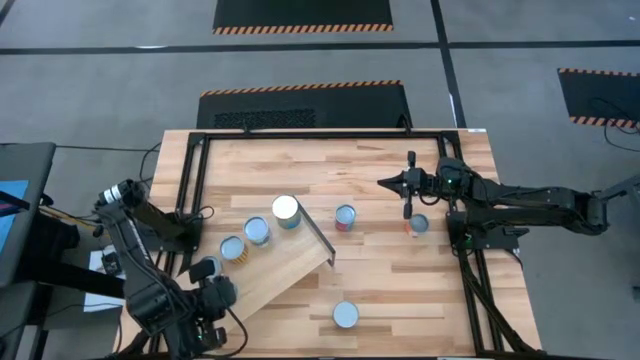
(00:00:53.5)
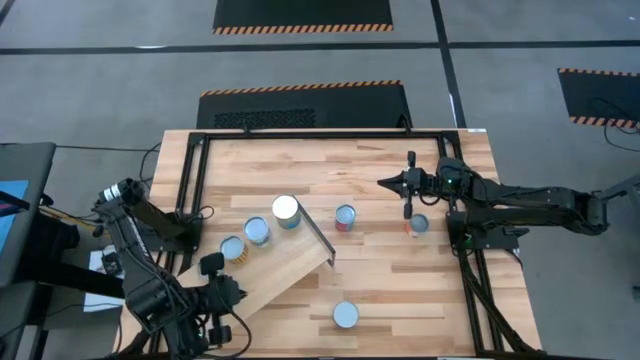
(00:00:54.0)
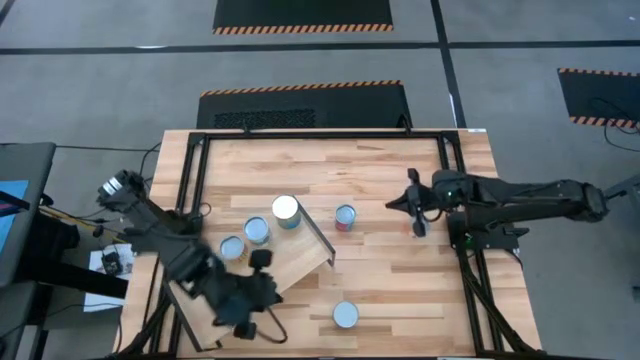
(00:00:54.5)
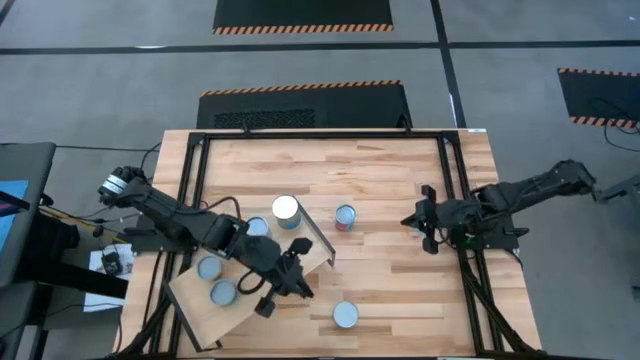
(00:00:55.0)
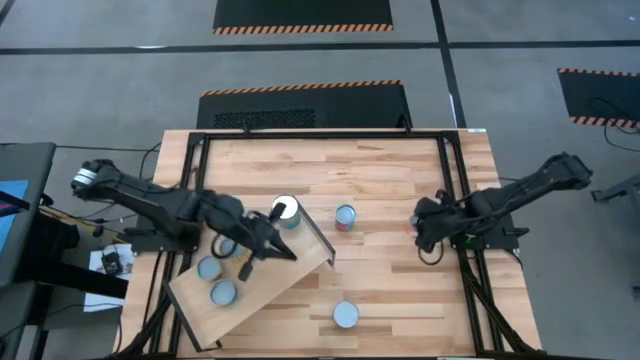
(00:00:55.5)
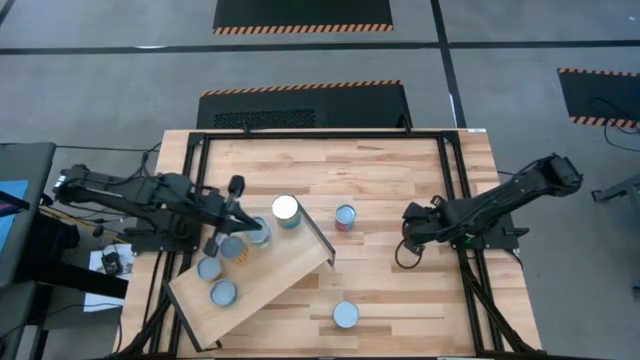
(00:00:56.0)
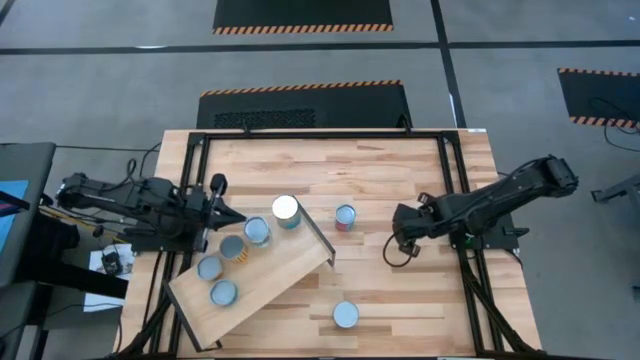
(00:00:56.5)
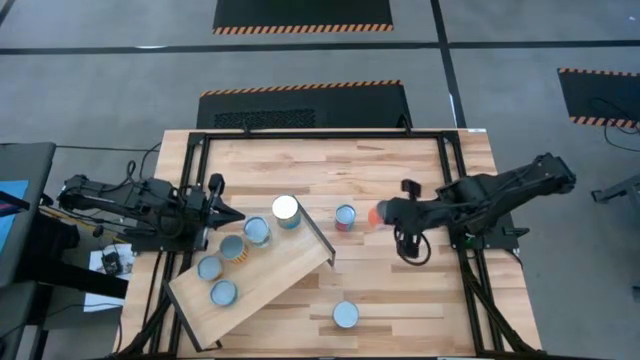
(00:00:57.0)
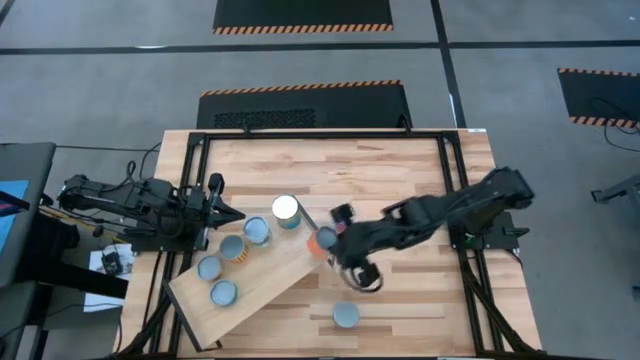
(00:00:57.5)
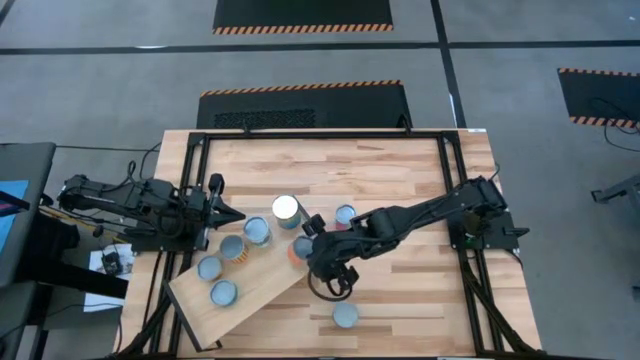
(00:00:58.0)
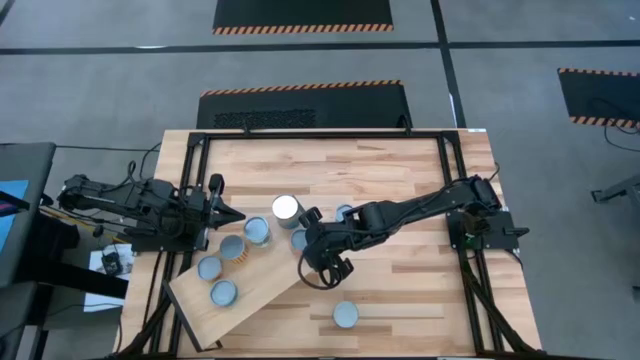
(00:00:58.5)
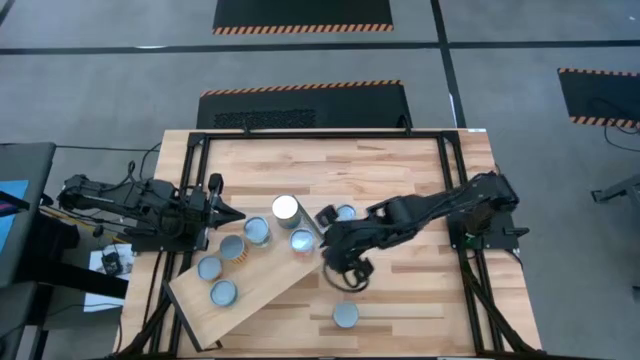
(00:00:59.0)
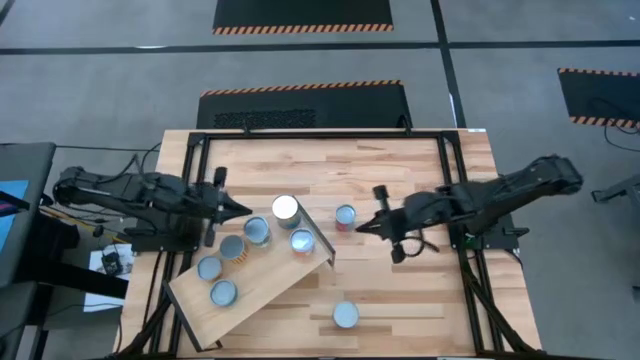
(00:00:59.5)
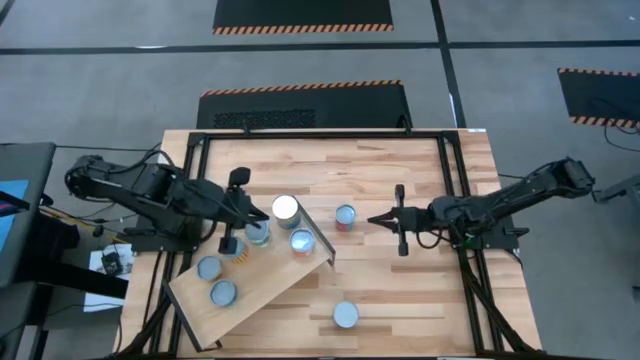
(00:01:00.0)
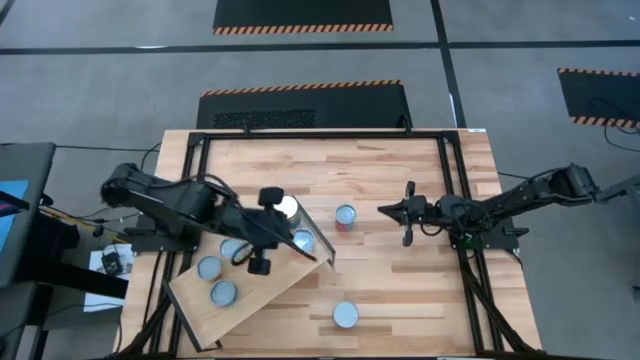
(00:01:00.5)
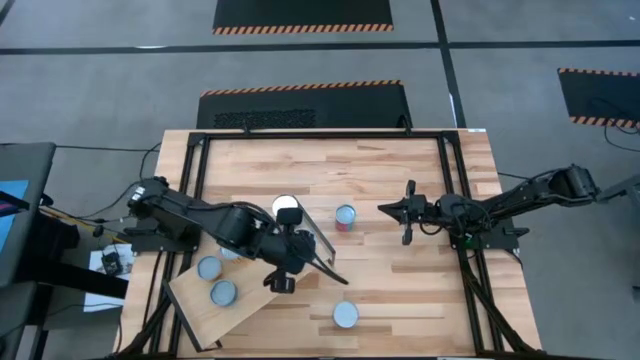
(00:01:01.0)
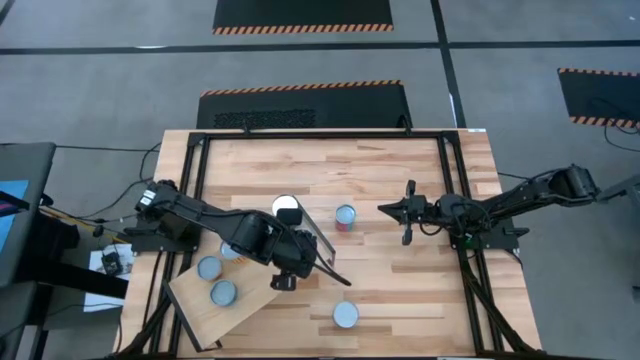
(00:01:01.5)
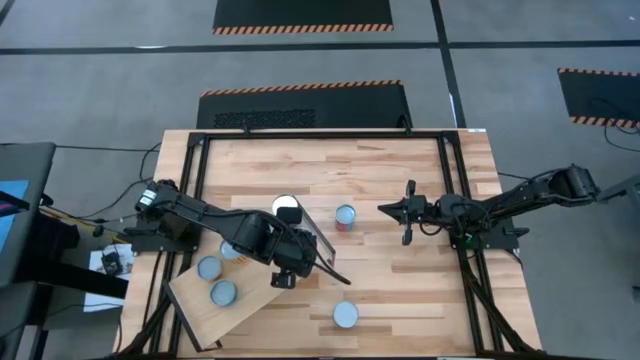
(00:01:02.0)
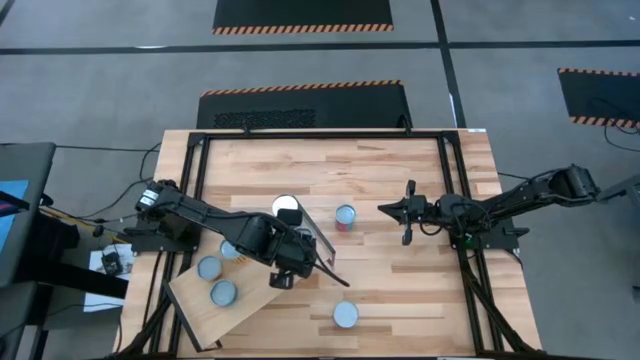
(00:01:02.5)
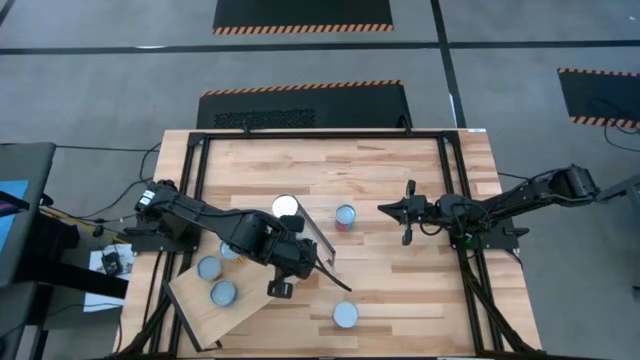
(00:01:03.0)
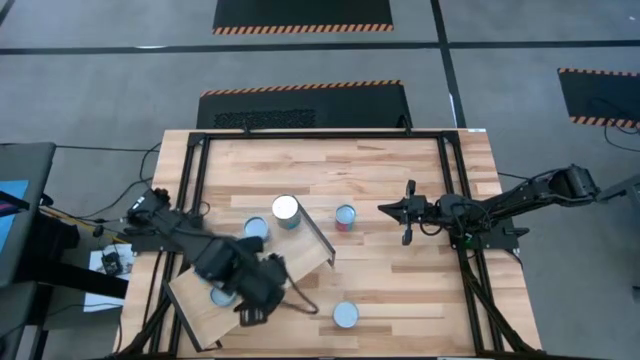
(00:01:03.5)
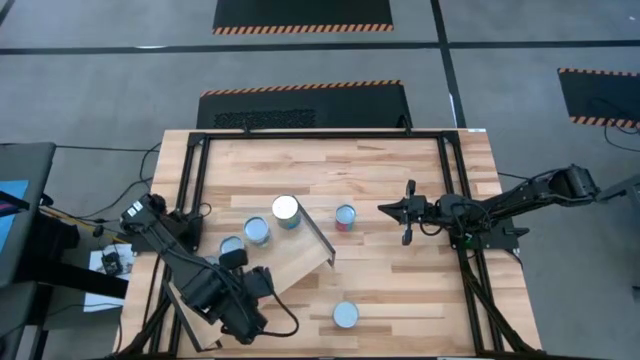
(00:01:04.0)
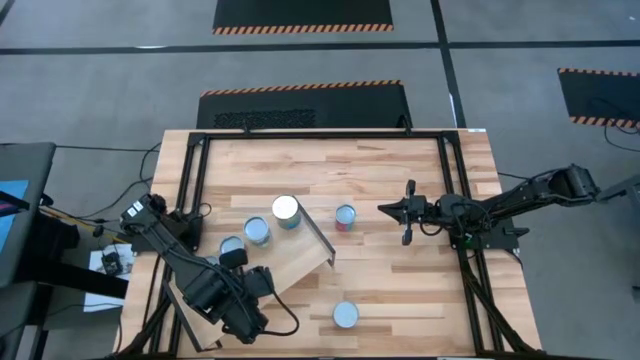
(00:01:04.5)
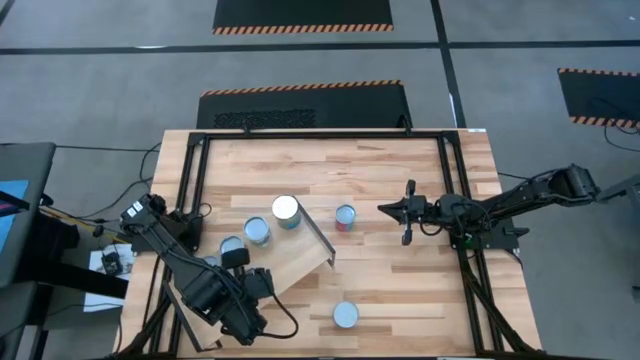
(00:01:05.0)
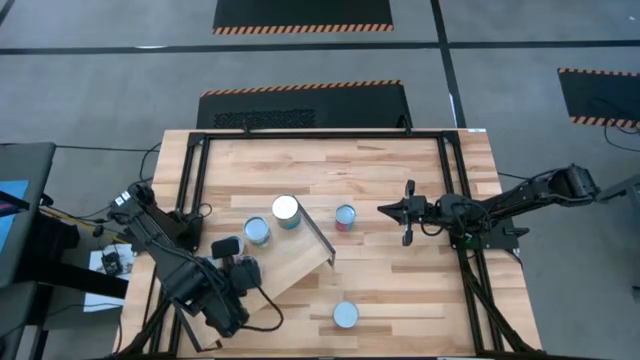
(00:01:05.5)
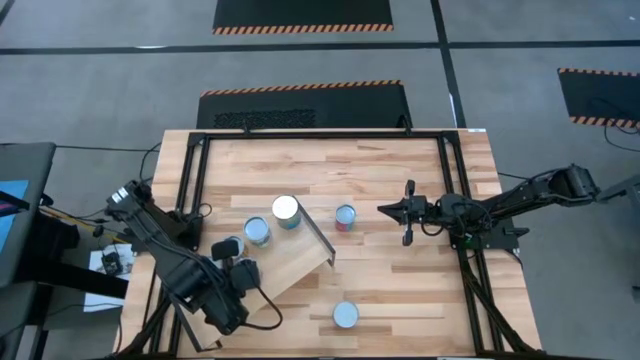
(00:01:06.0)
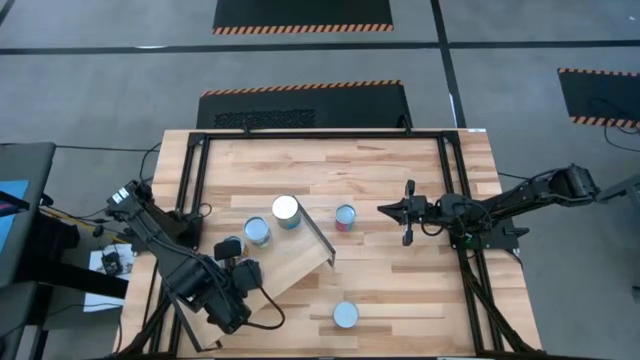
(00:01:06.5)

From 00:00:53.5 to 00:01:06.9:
Task: Pick and place cans onto a shelf
Put the canned meatballs on the shelf

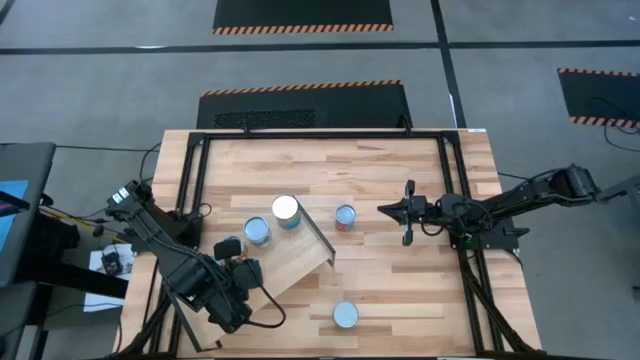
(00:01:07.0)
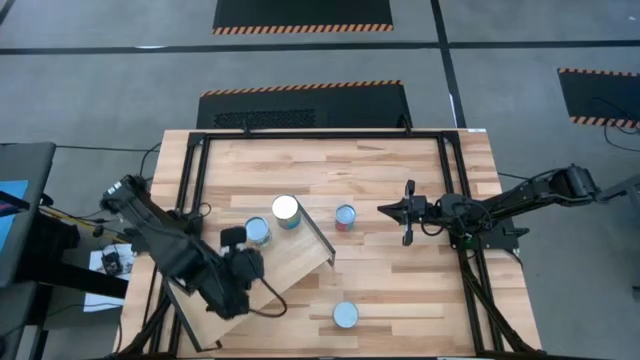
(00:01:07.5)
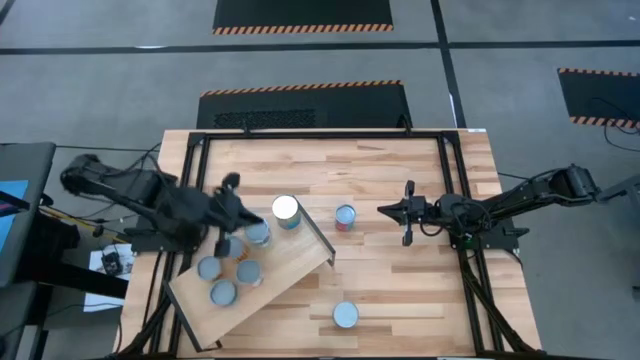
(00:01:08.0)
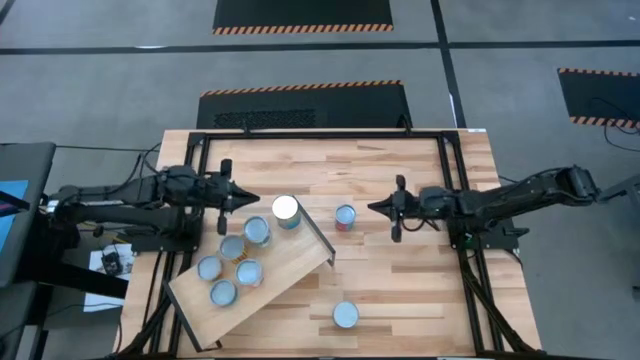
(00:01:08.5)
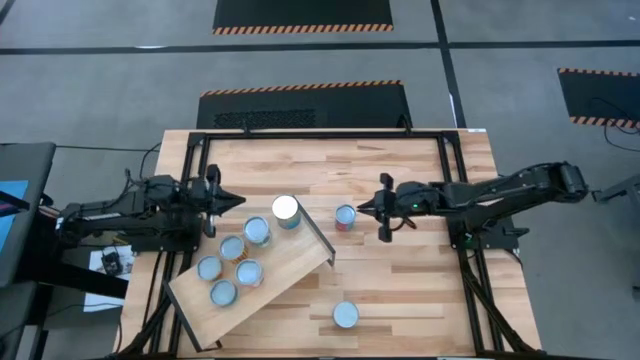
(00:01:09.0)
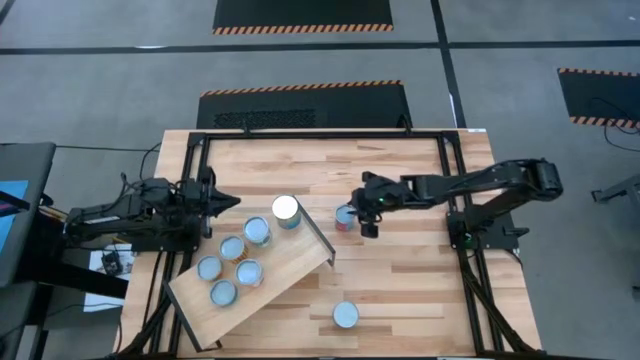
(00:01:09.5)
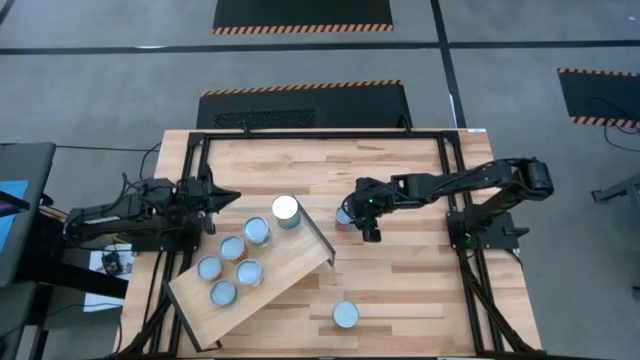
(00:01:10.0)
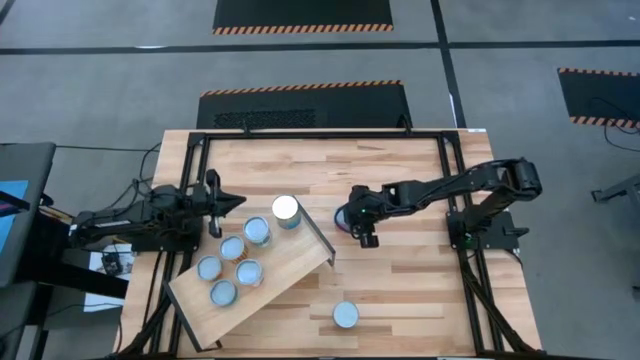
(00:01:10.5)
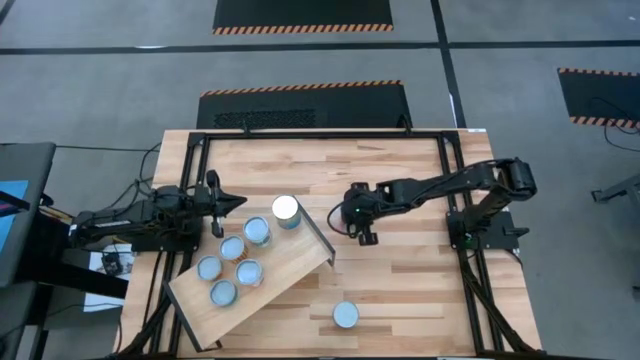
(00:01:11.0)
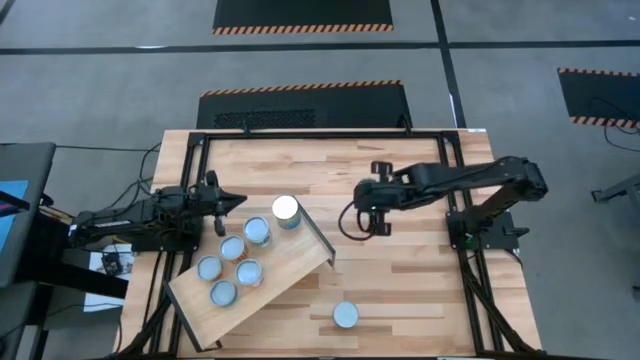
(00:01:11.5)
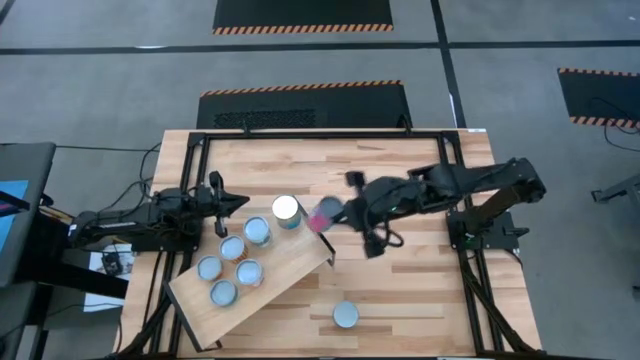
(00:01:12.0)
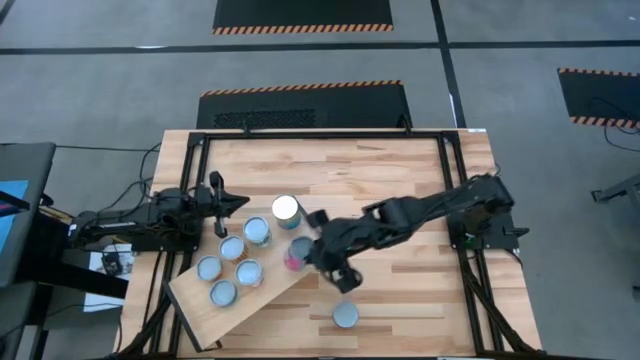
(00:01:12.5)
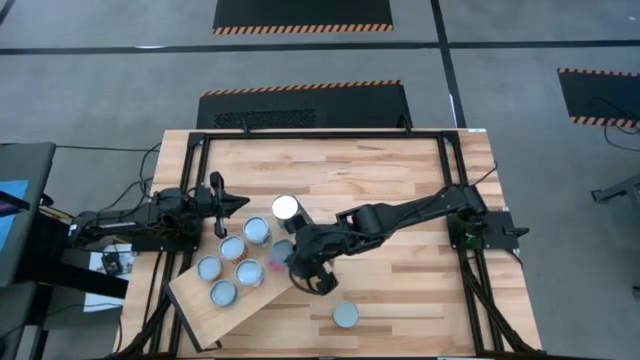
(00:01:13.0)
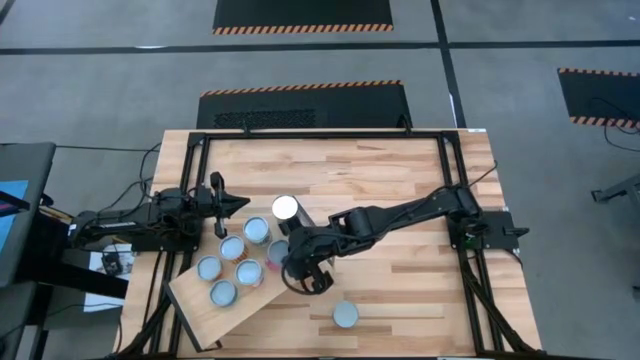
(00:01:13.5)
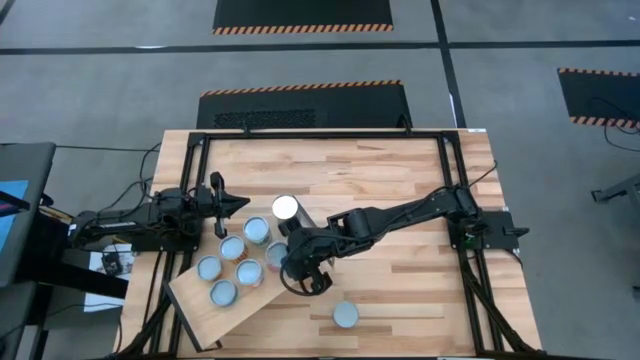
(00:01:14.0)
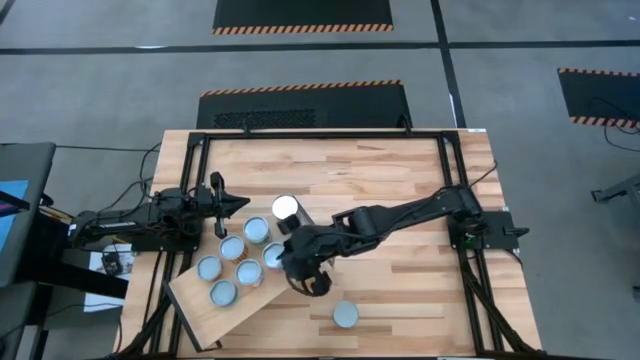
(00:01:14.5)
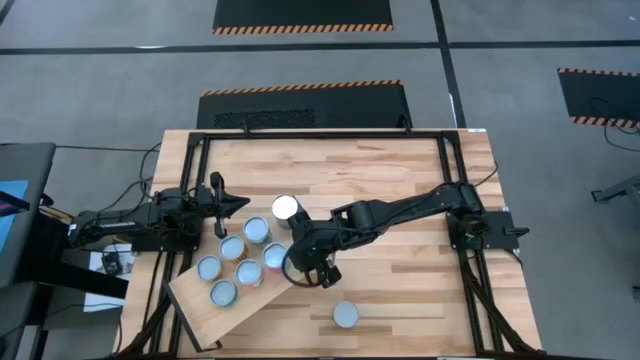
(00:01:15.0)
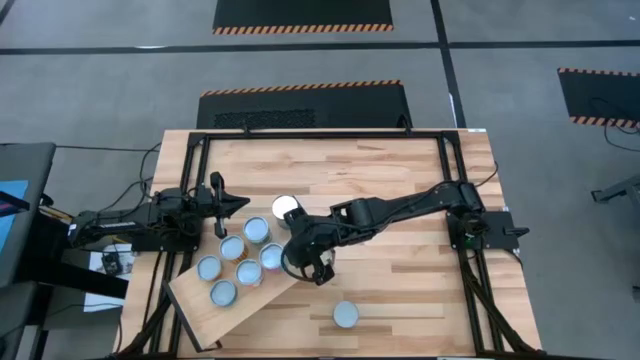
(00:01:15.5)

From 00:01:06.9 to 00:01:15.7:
Put the canned chicken soup on the shelf
